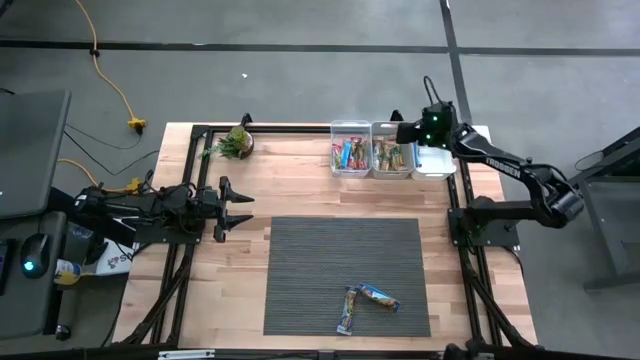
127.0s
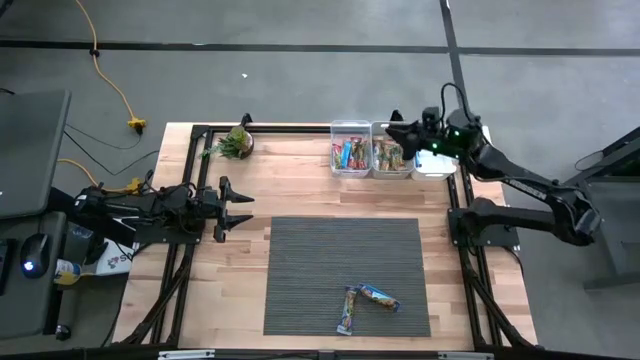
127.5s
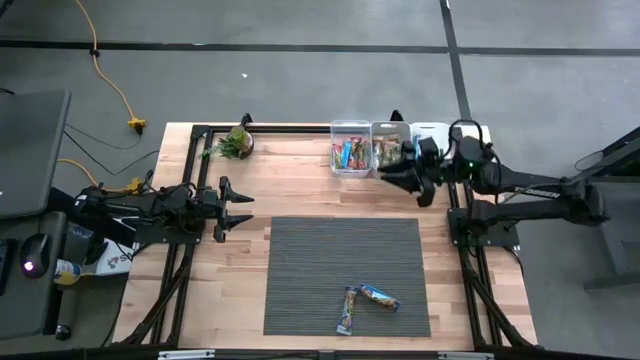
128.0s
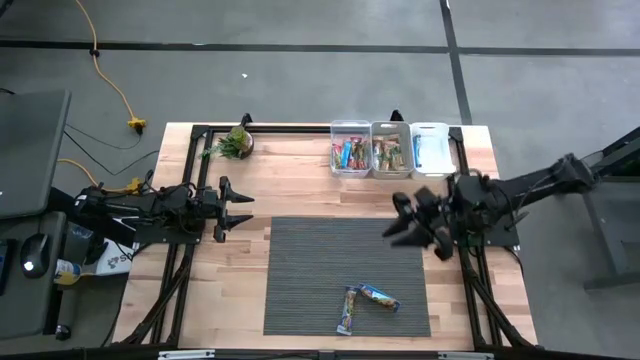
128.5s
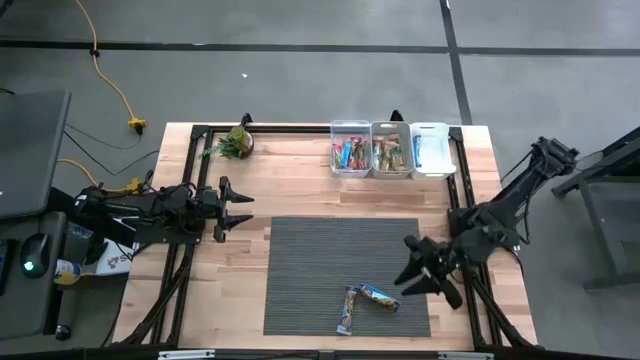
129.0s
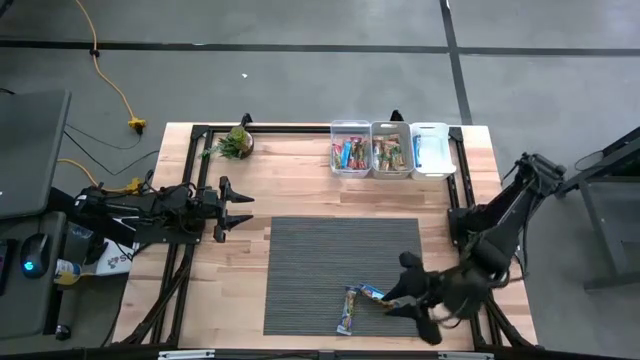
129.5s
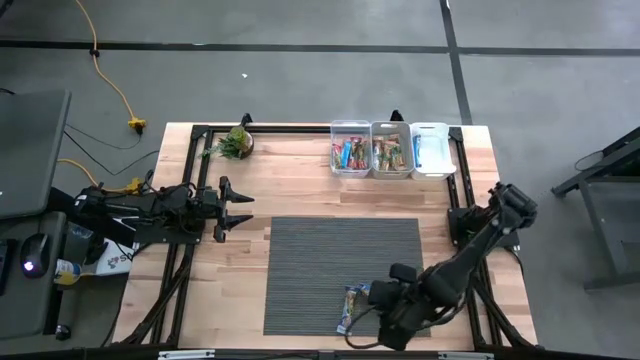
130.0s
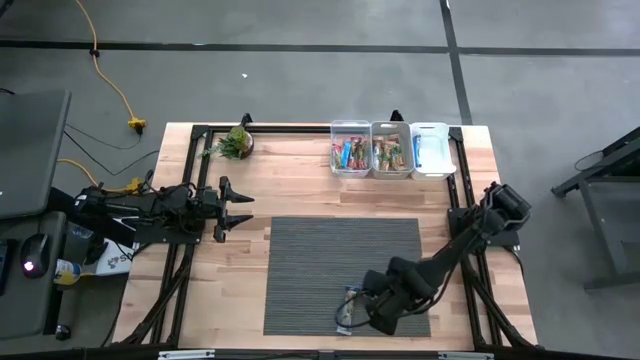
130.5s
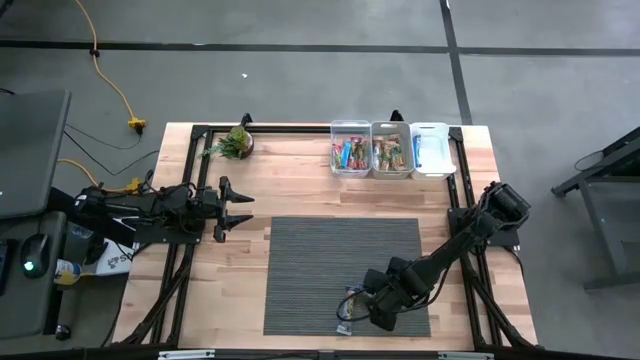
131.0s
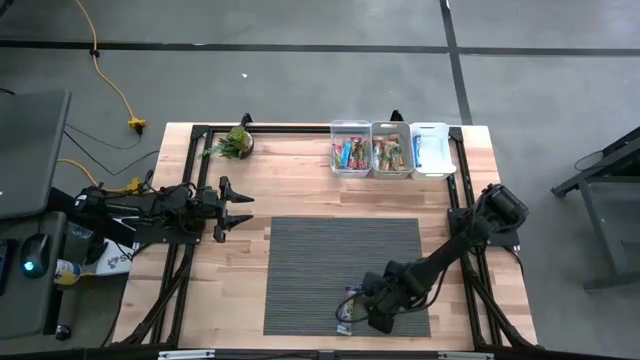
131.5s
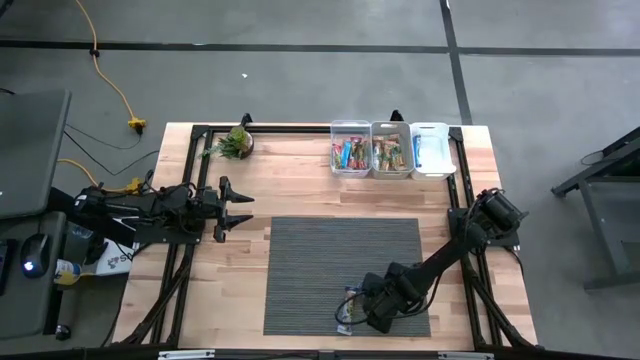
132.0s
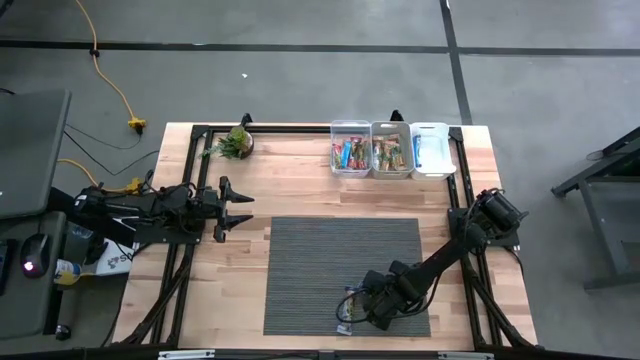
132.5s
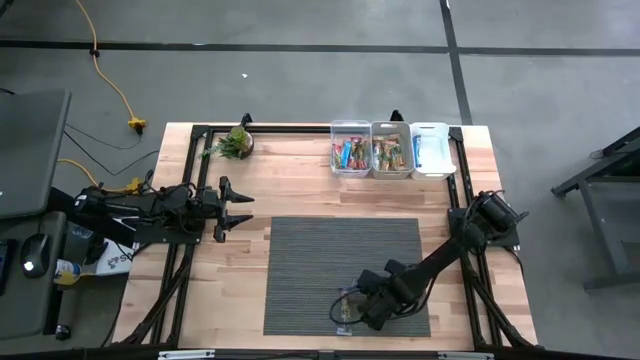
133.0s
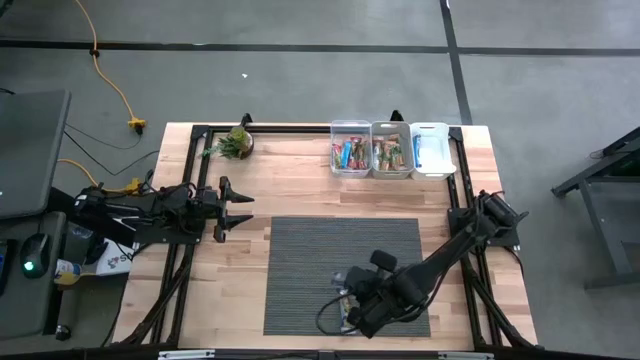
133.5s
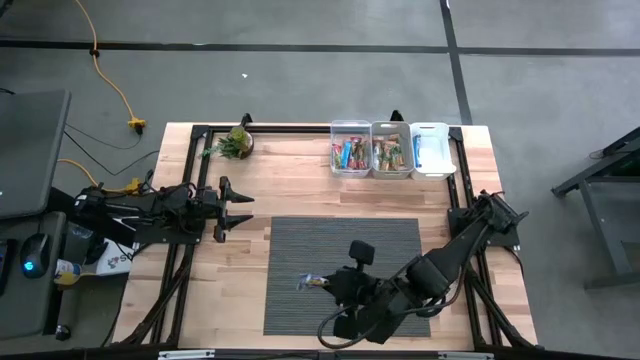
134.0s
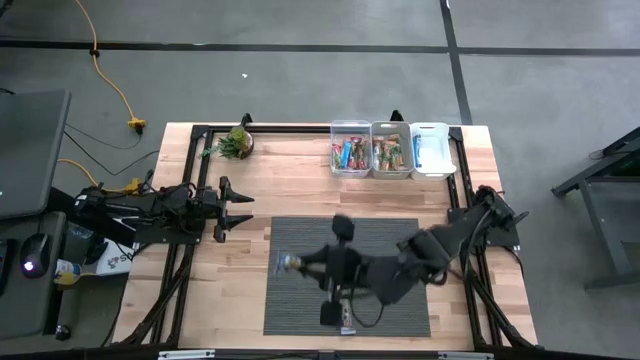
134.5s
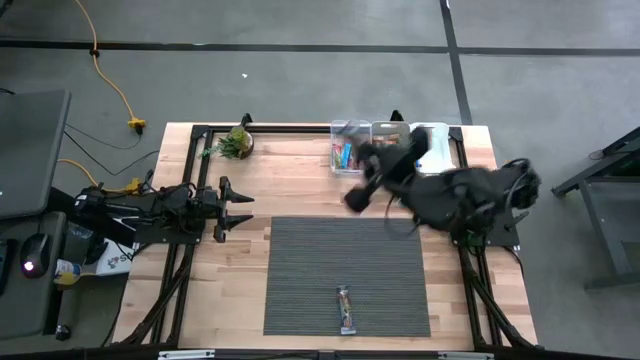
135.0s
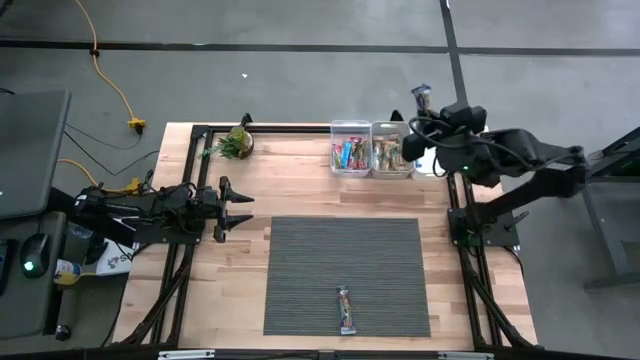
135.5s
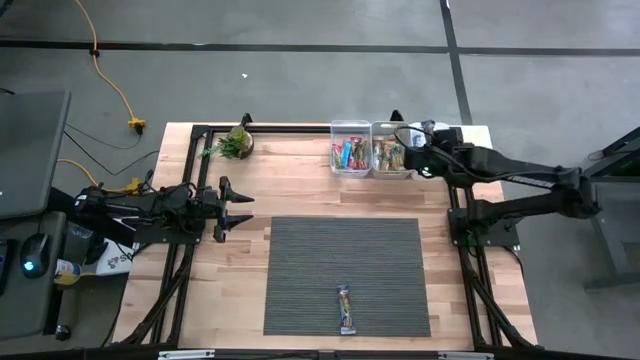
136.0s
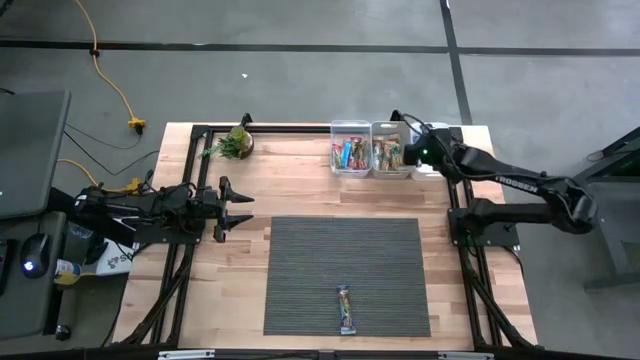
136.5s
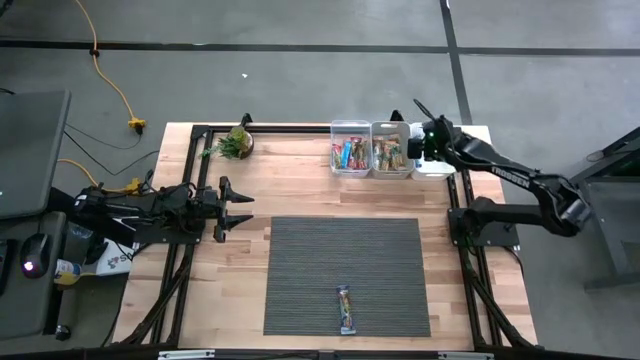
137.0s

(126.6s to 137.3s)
Task: Pick and place Granola Bars by type
Put the blue granola bar into the white bin

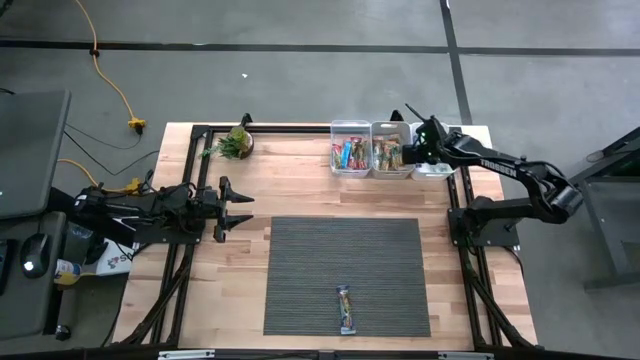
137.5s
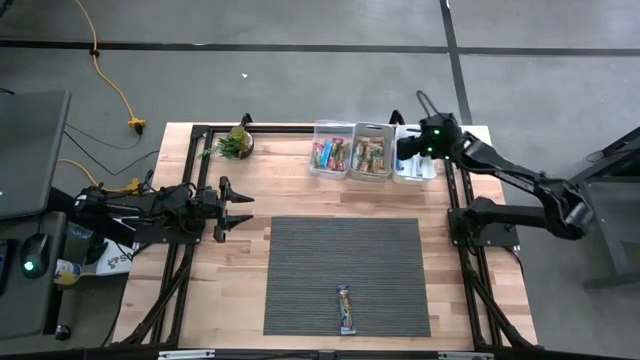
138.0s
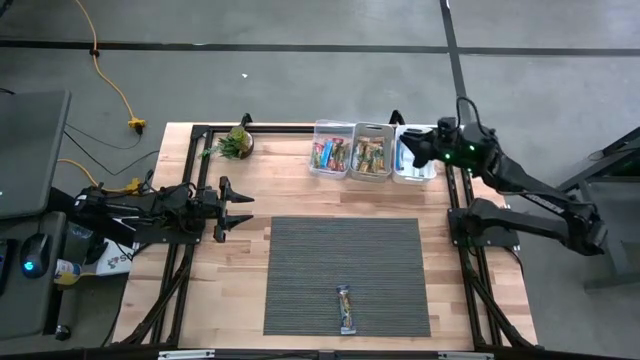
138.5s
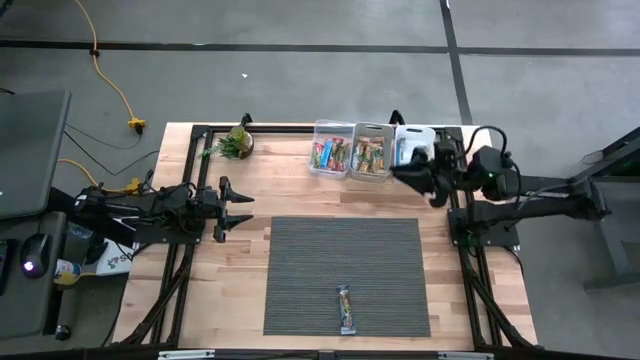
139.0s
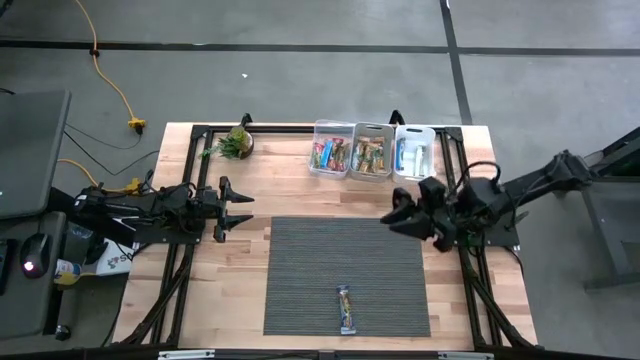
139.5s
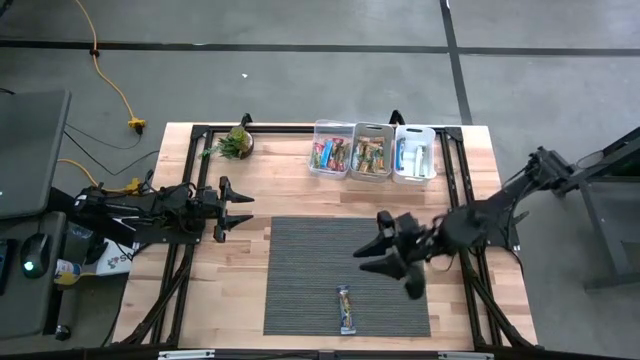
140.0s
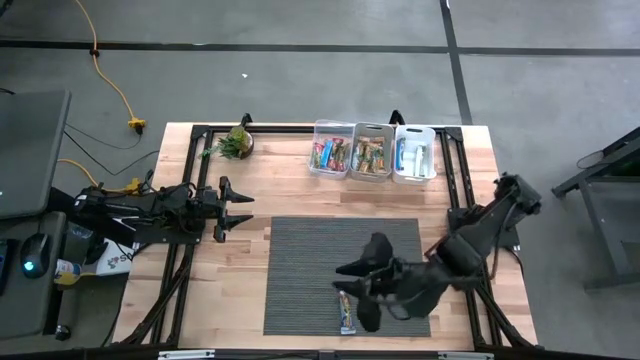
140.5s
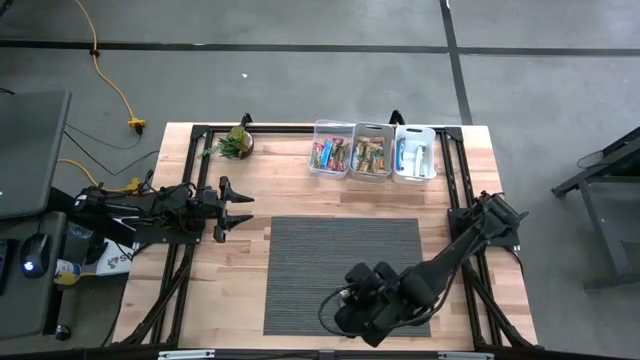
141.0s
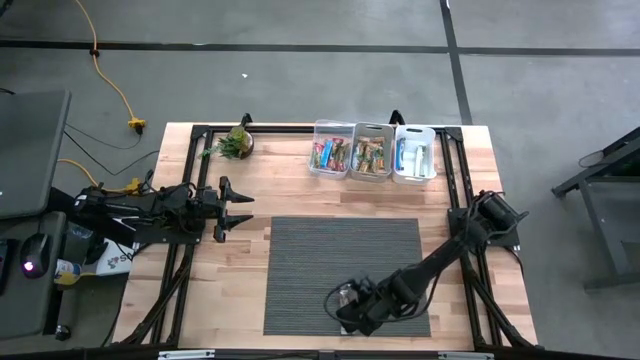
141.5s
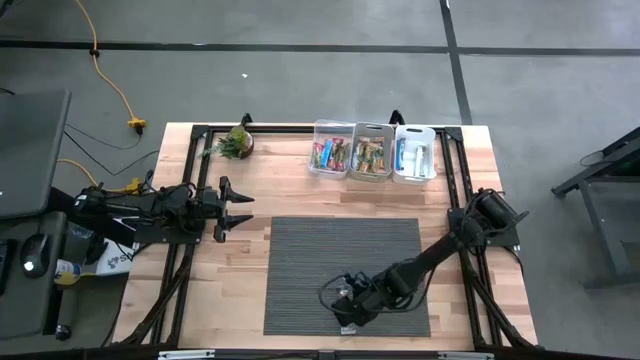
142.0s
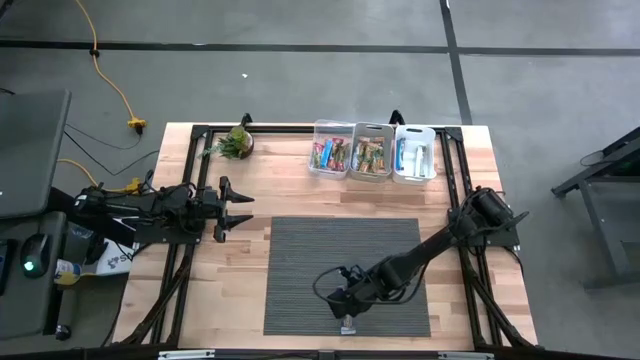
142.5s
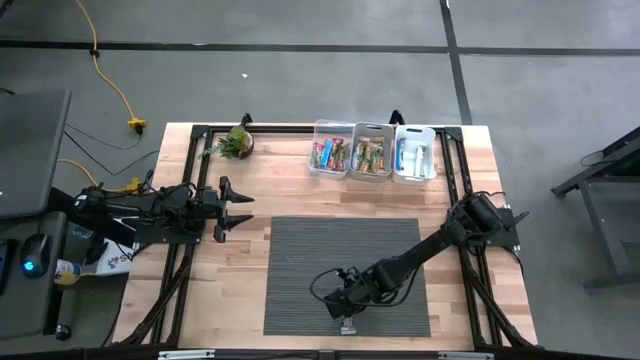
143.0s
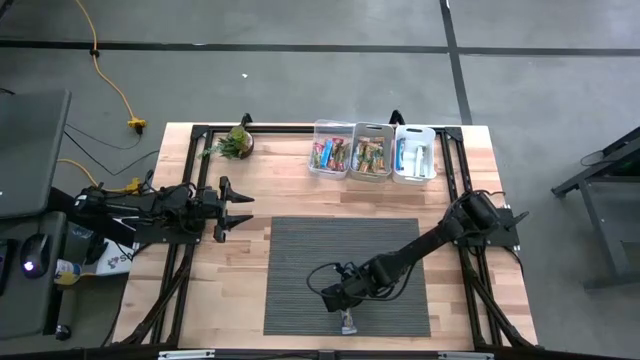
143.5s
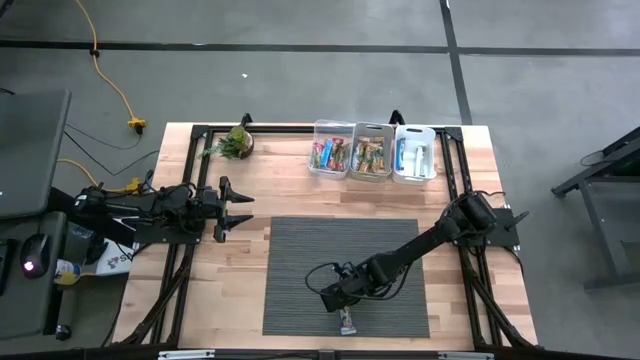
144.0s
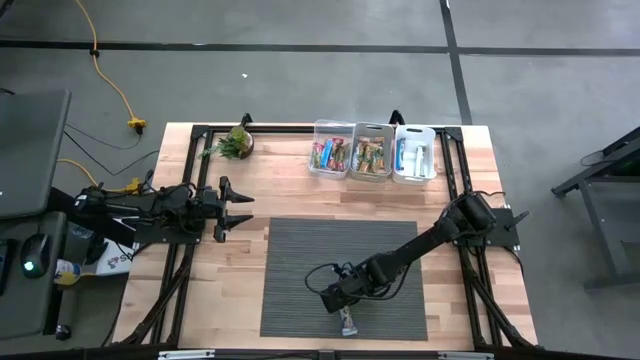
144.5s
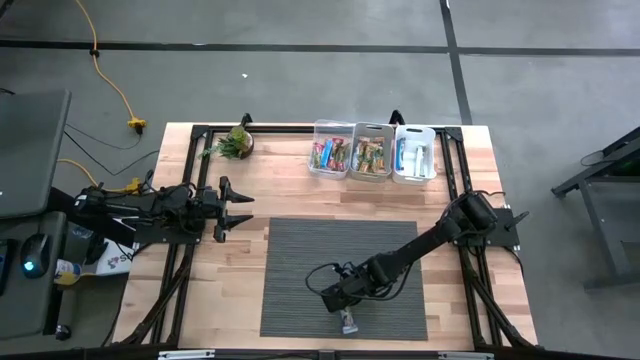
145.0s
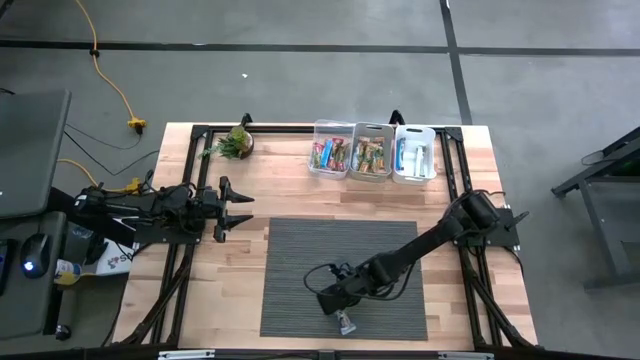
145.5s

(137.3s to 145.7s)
Put the blue granola bar into the white bin

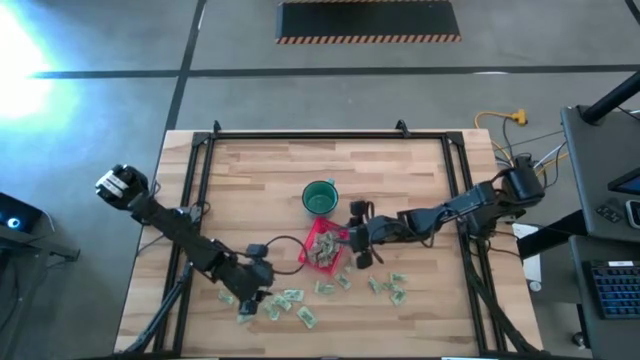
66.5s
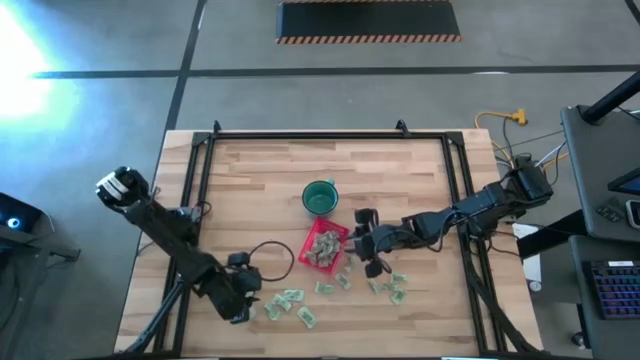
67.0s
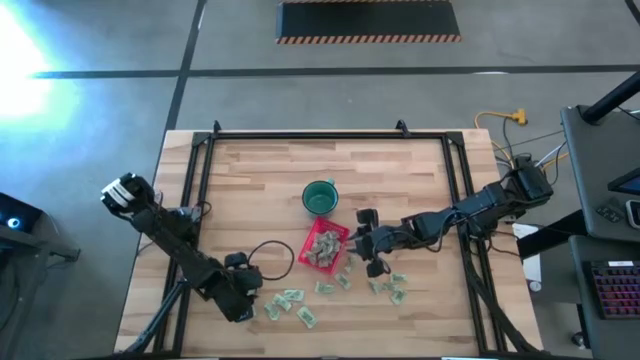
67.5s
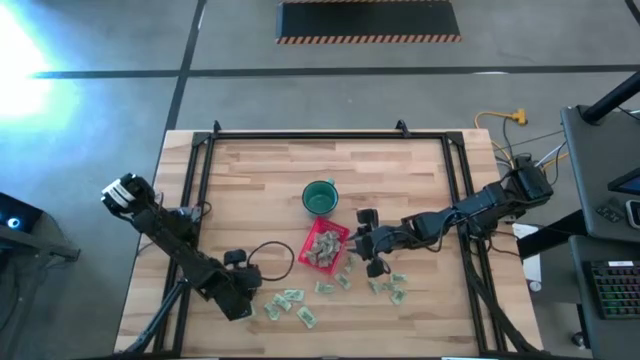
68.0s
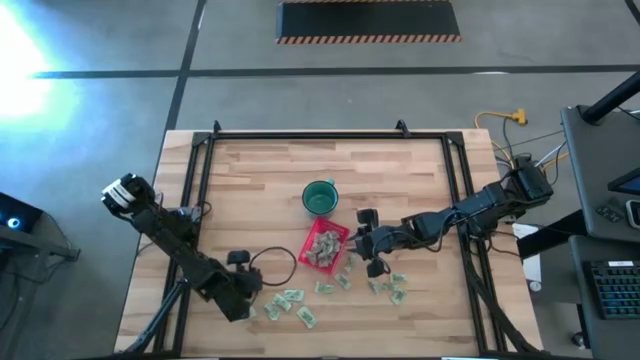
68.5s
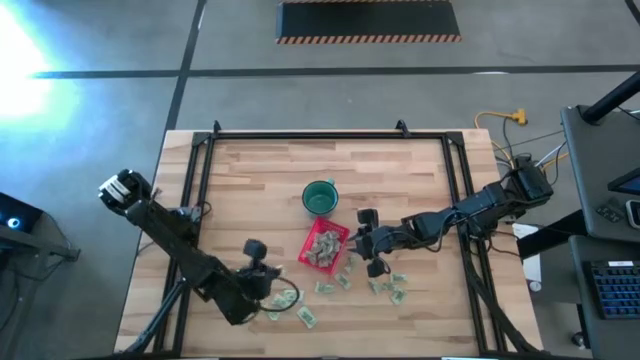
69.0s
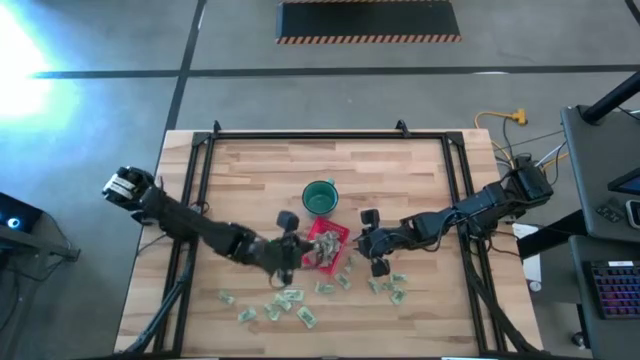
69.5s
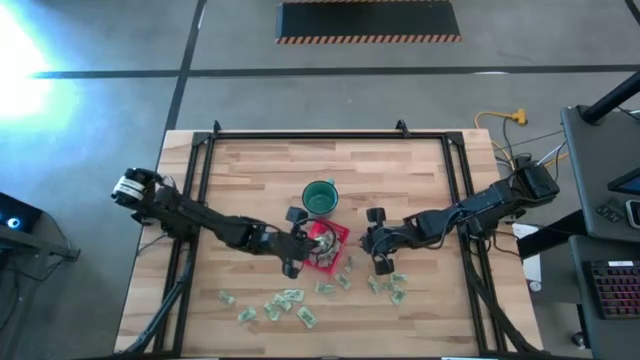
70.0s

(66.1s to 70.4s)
Task: Pick and place items into bin
Put the light green stevia packet into the red bin
